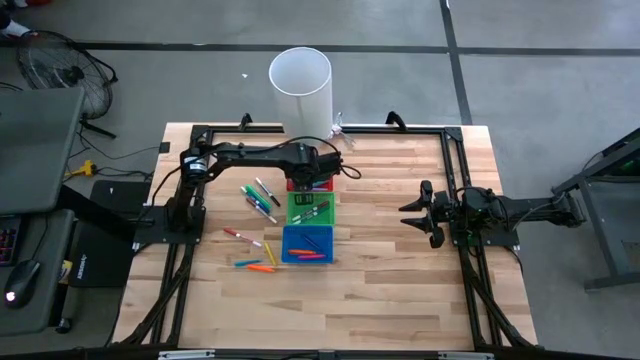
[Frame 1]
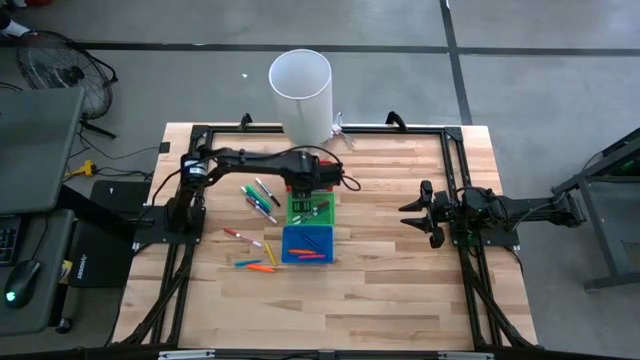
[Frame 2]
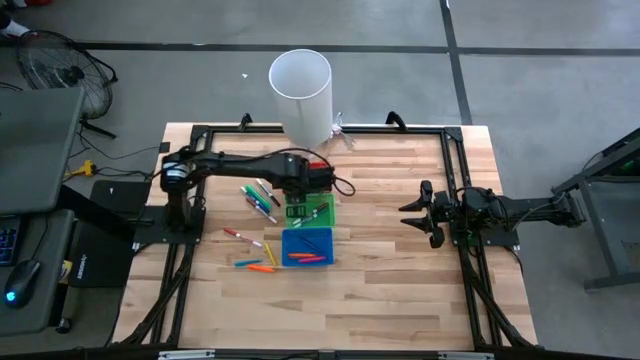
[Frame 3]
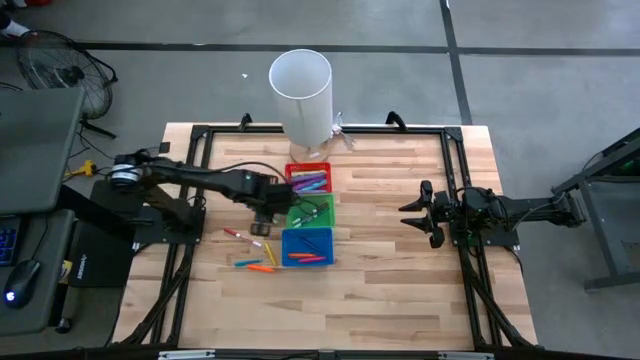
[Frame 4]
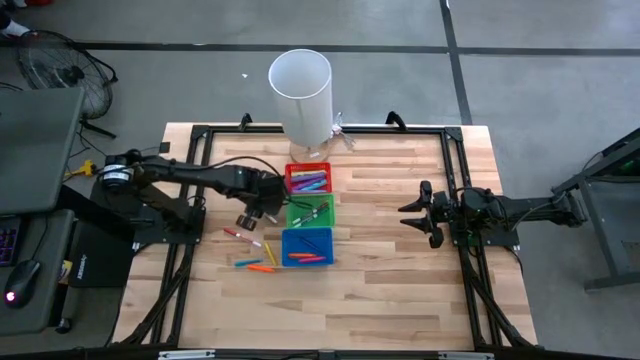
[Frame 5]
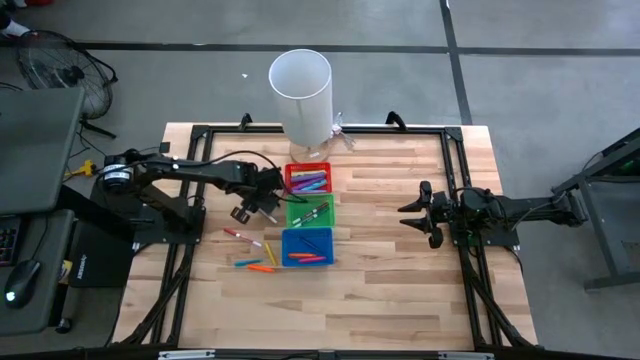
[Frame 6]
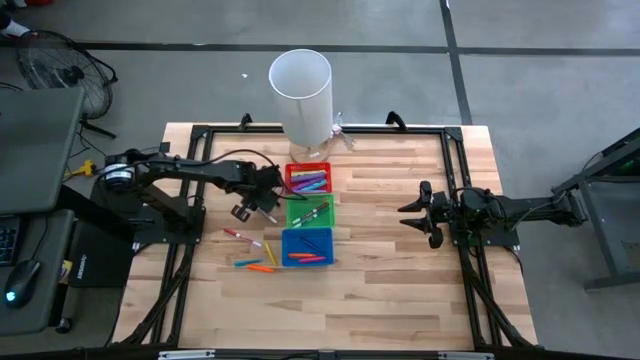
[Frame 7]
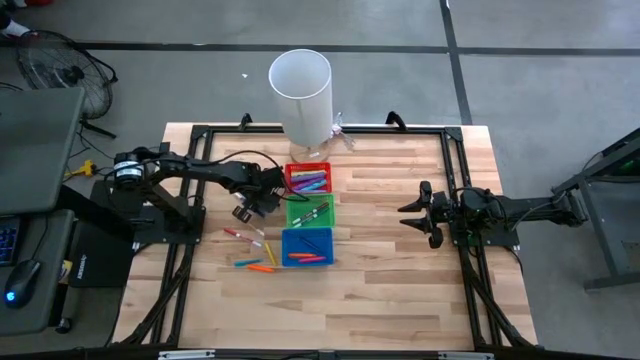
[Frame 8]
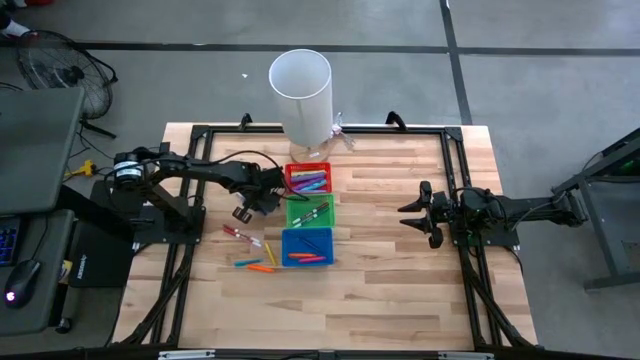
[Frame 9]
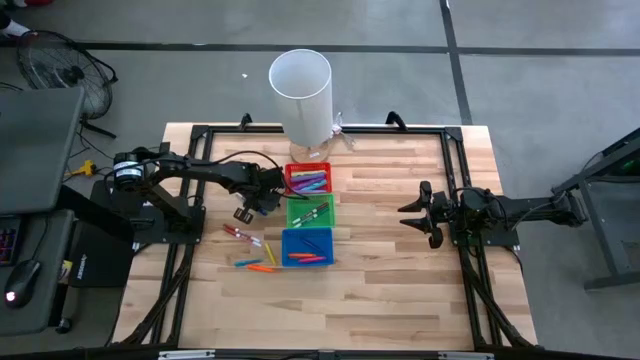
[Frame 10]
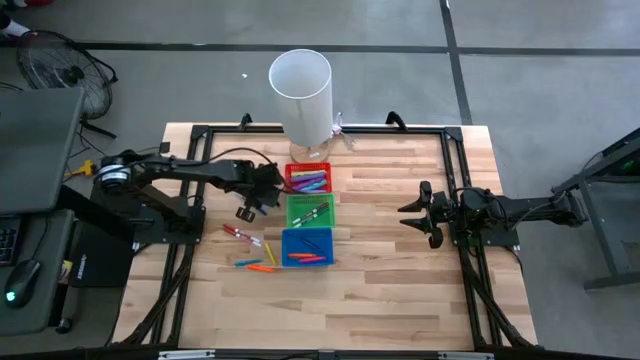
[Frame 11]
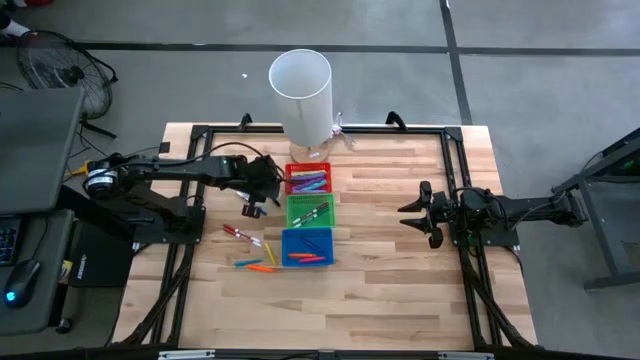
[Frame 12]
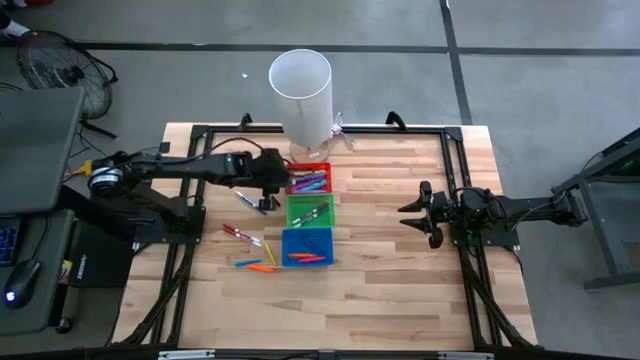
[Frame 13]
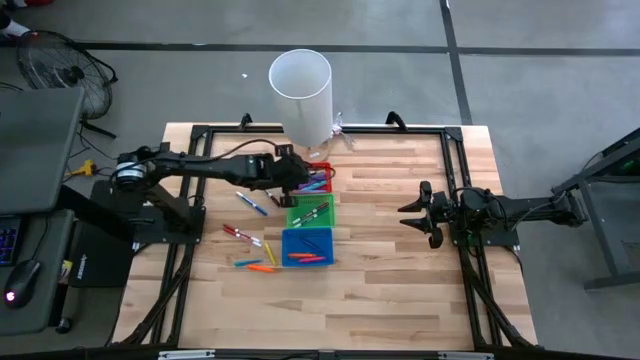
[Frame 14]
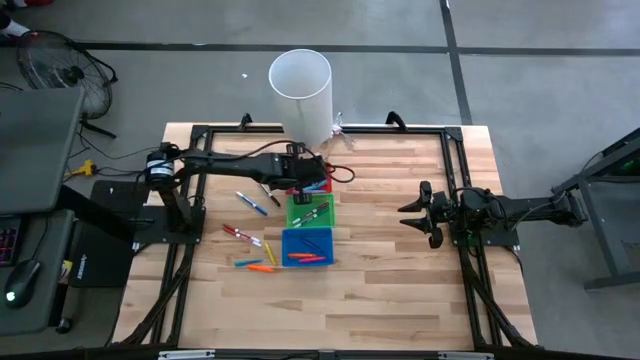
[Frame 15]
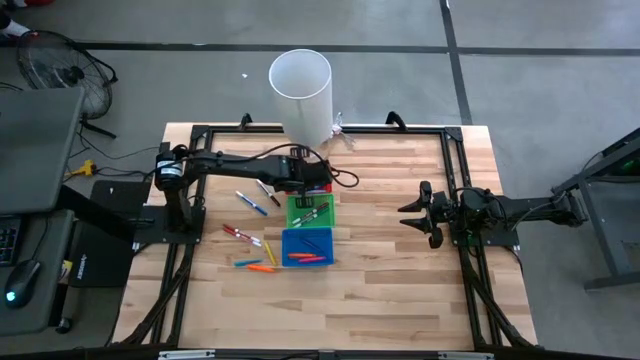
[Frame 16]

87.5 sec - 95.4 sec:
Task: Pick & Place Markers
Put the green highlighter into the red bin

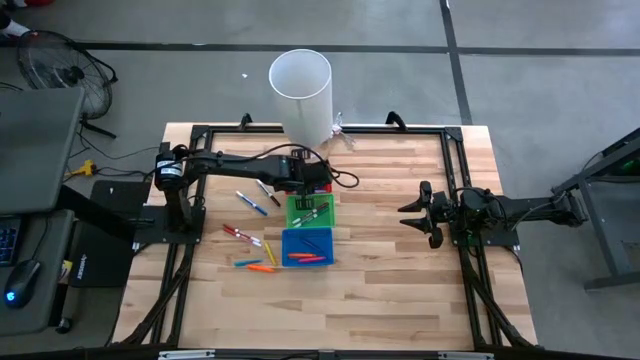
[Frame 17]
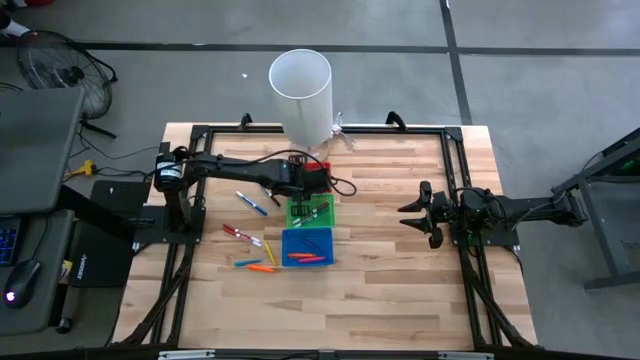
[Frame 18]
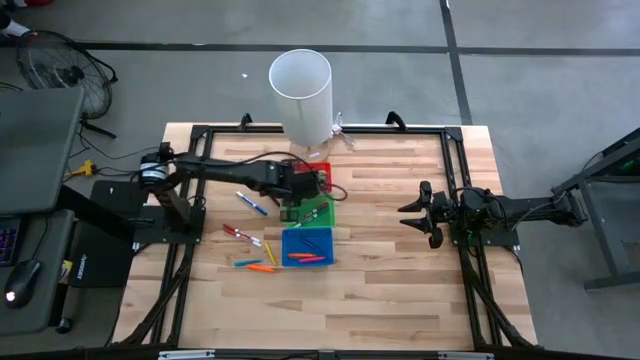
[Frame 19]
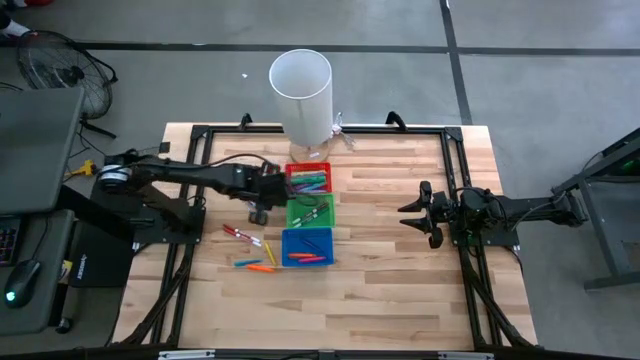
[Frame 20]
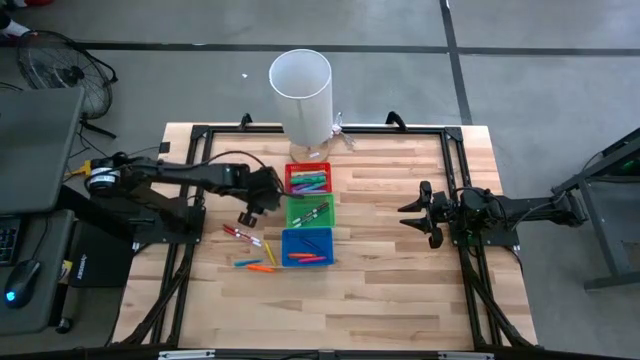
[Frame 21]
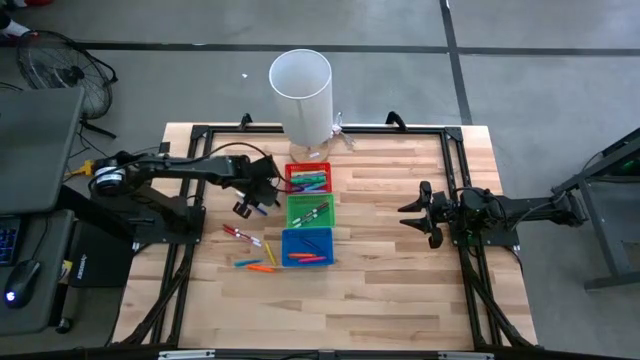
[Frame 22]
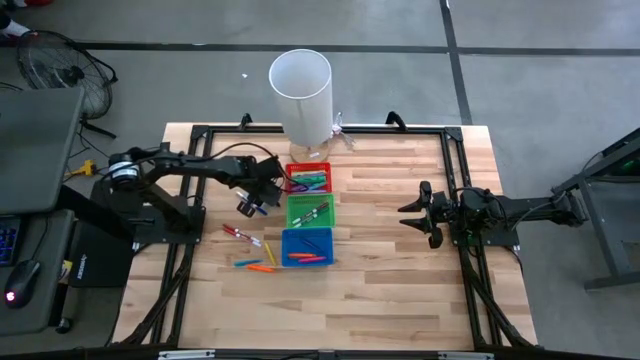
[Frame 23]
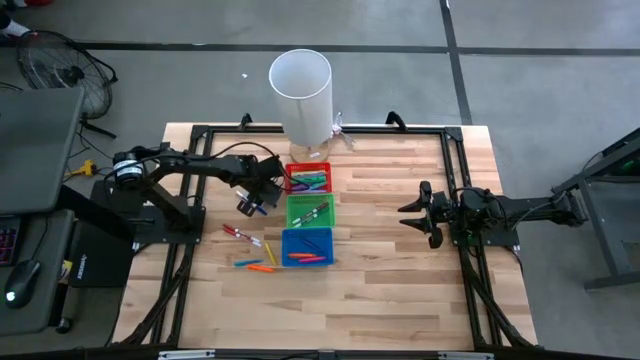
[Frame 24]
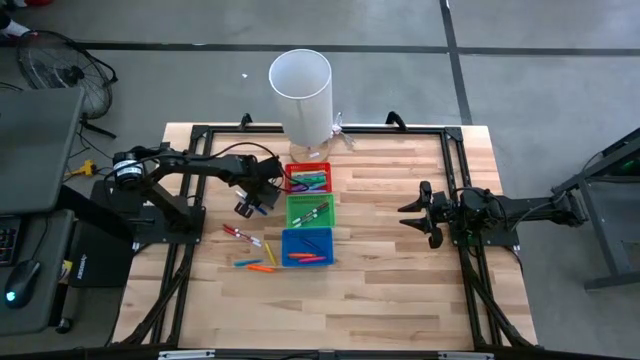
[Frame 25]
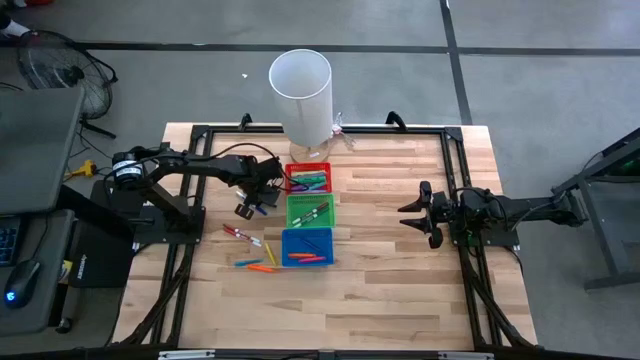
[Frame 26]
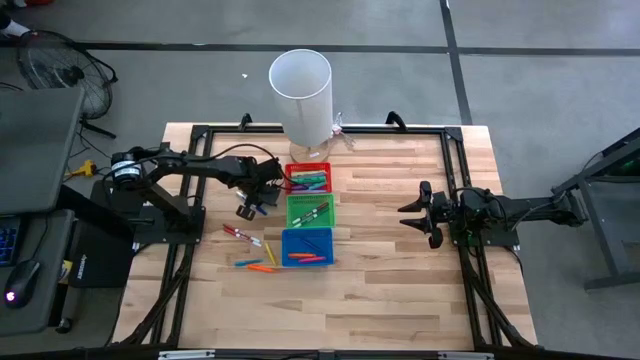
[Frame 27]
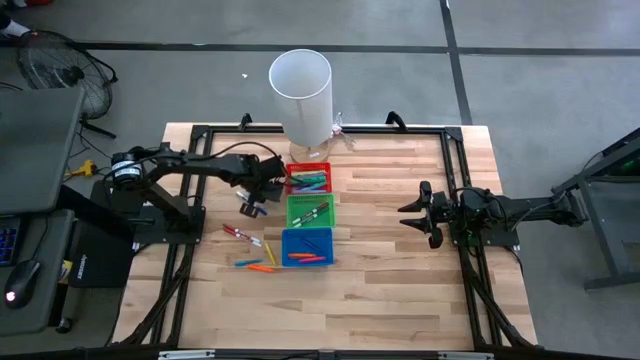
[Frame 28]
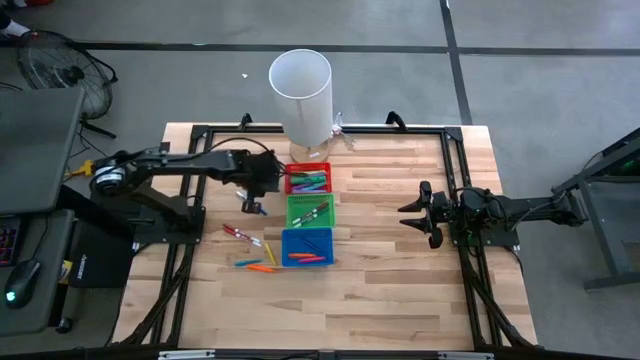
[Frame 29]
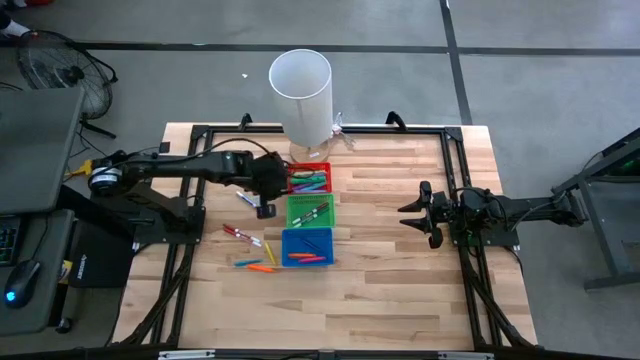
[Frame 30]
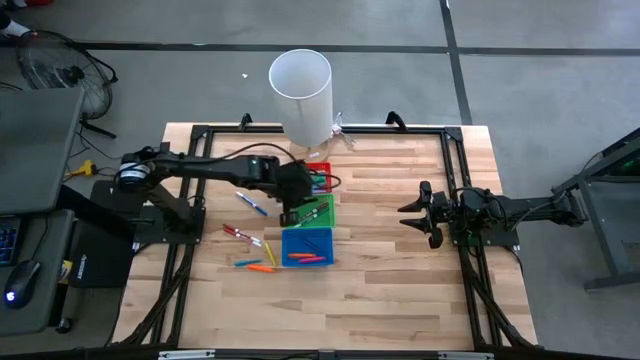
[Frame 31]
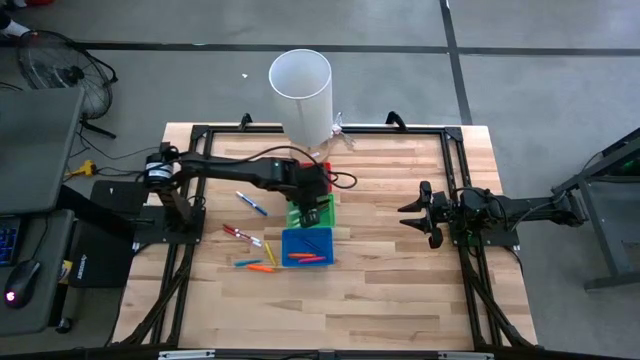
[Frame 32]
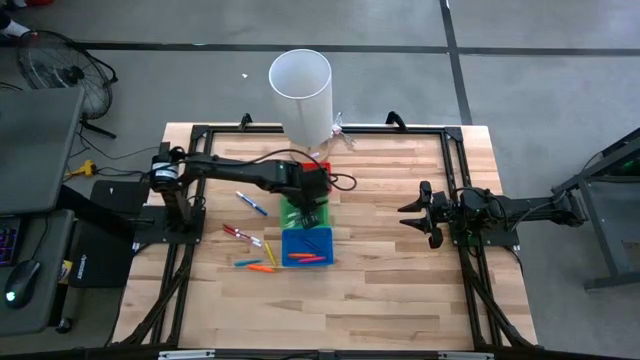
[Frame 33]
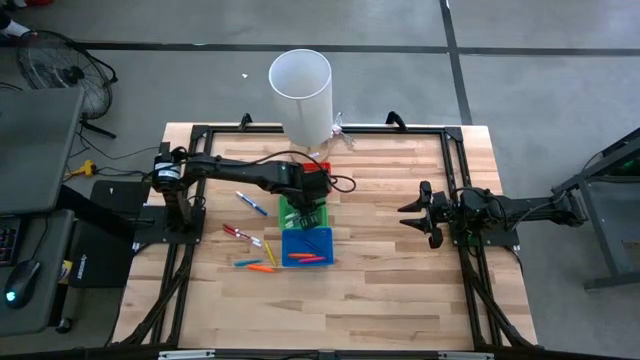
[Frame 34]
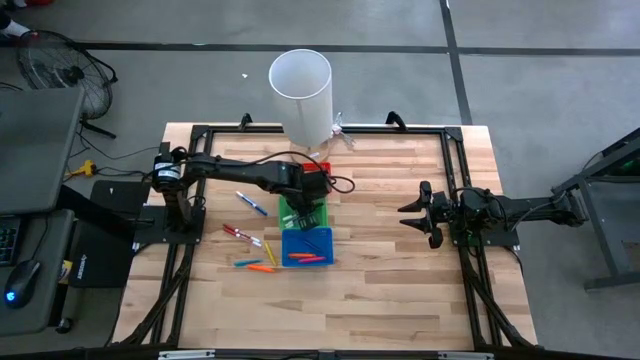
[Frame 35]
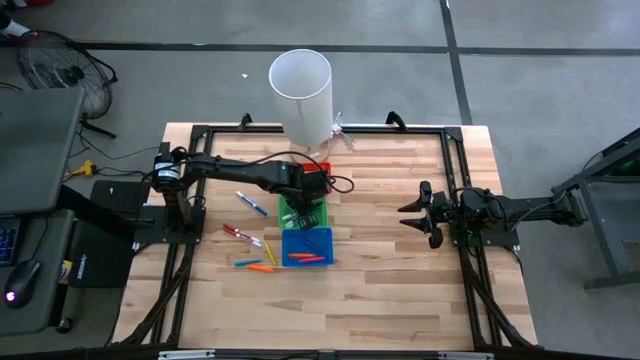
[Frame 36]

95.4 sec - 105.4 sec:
Put the white and black marker pen into the green bin

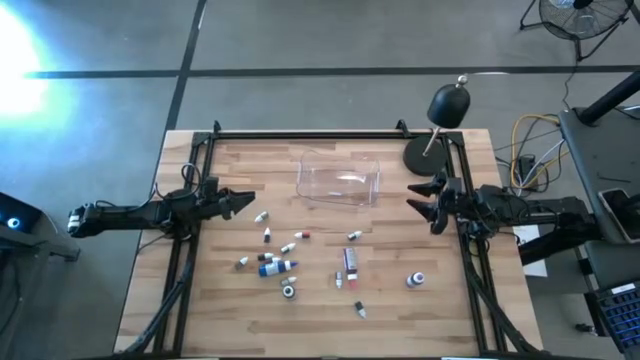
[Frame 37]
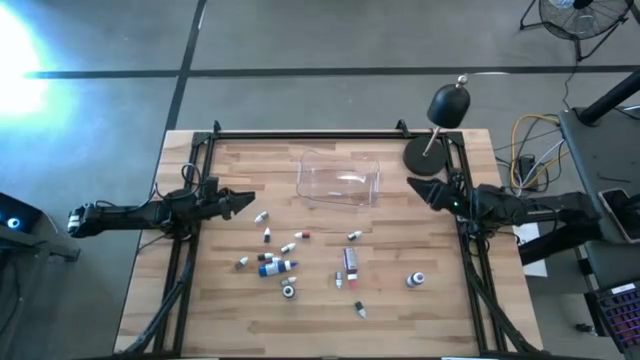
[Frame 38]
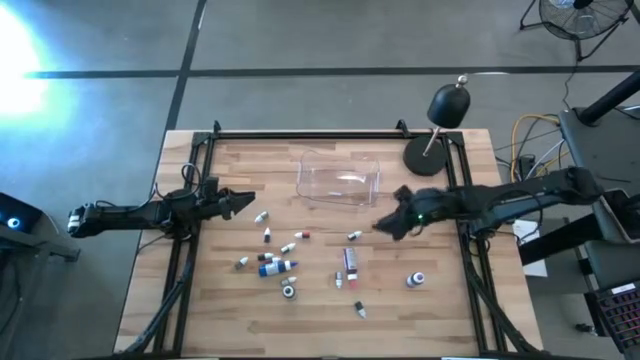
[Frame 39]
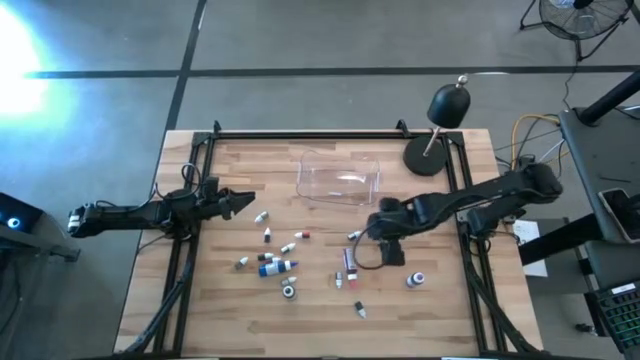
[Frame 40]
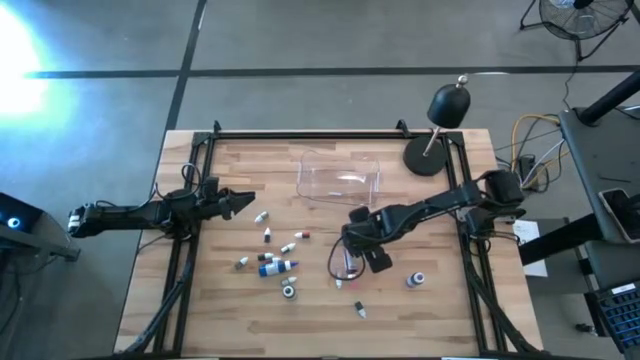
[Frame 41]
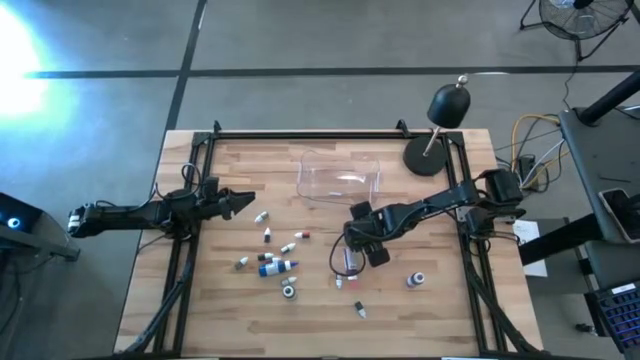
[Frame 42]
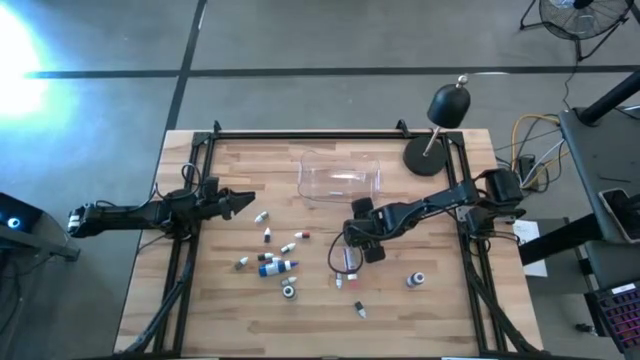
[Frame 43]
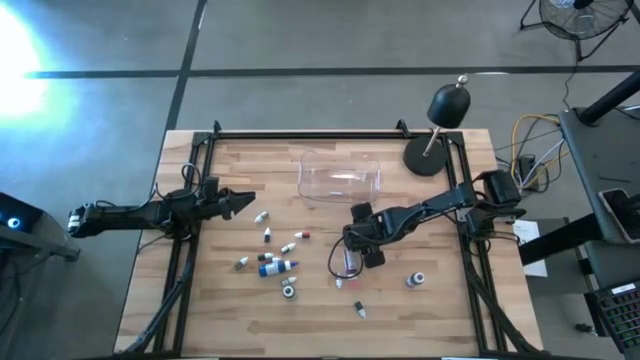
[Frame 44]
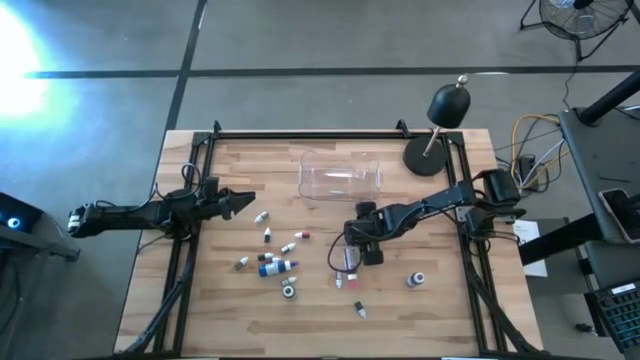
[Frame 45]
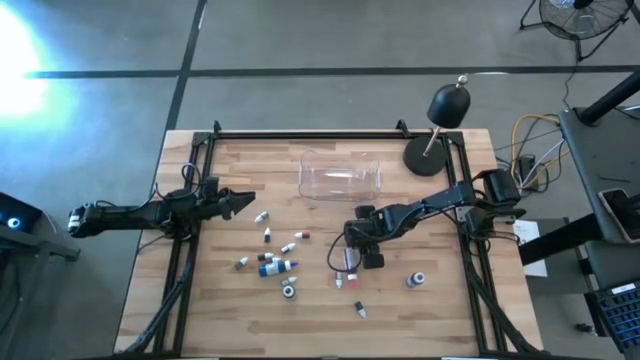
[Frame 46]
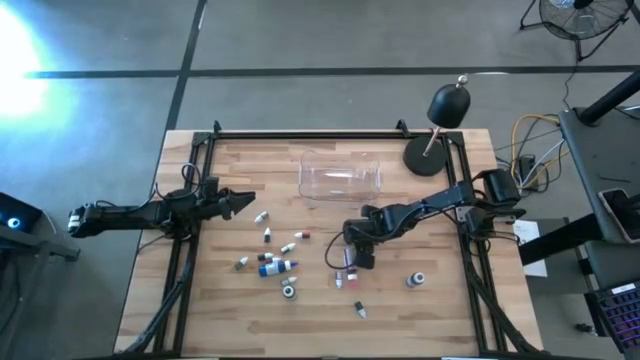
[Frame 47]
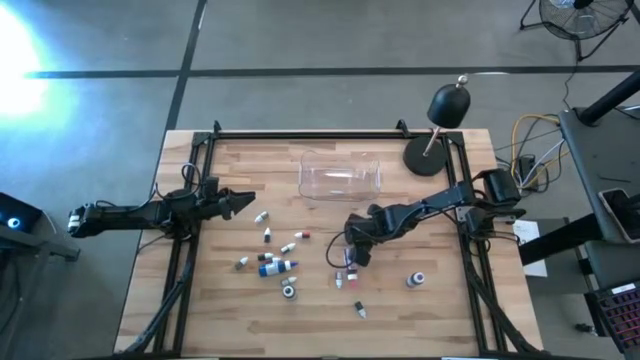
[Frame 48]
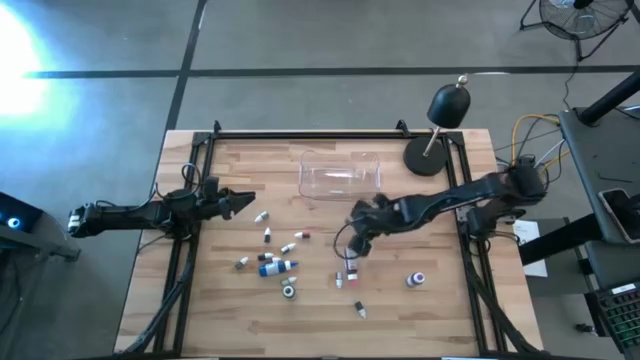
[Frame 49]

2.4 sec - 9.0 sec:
Task: Pick & Place food coloring
Put the small red food coloring bottle into the transparent bin
